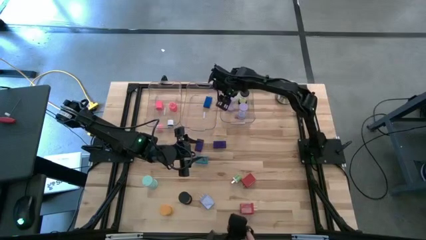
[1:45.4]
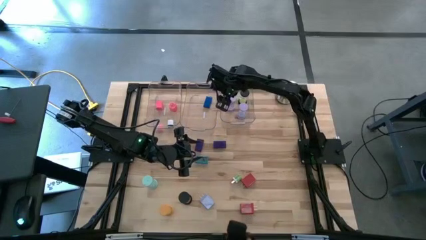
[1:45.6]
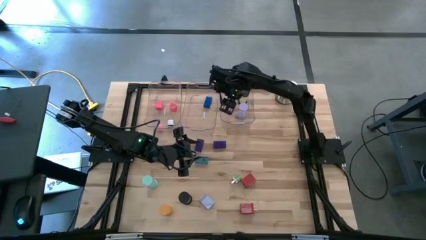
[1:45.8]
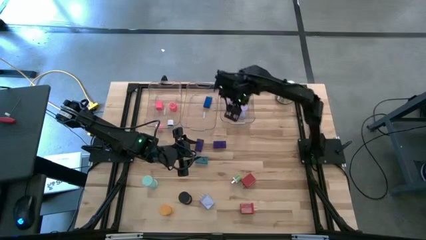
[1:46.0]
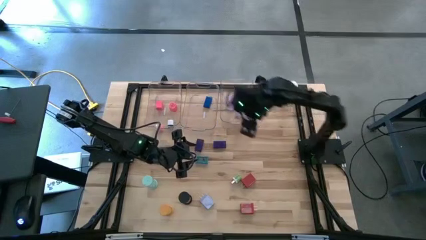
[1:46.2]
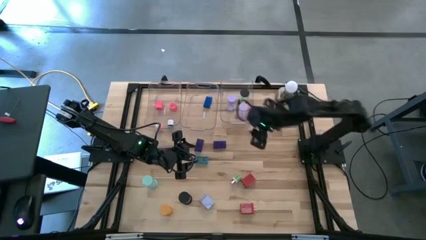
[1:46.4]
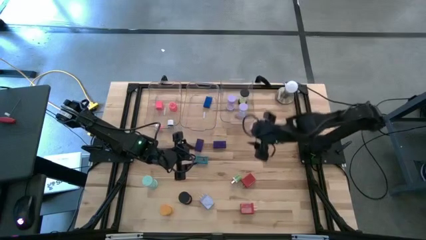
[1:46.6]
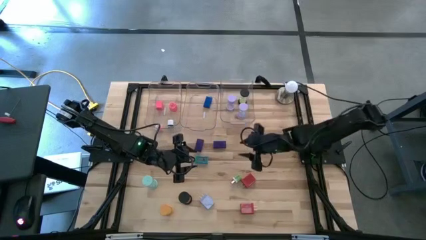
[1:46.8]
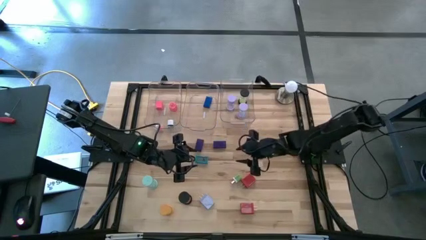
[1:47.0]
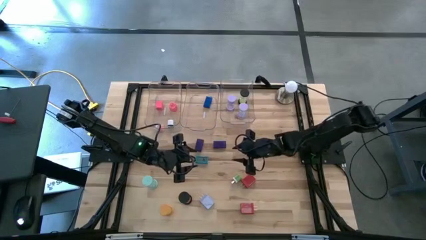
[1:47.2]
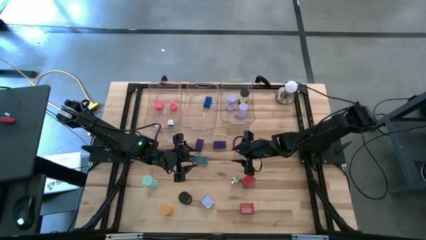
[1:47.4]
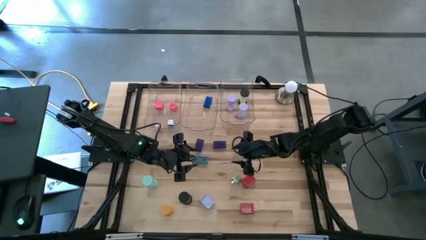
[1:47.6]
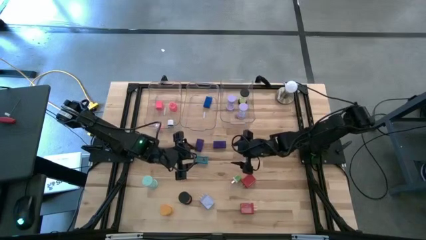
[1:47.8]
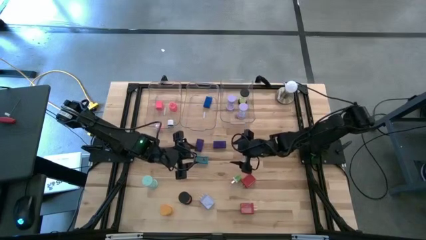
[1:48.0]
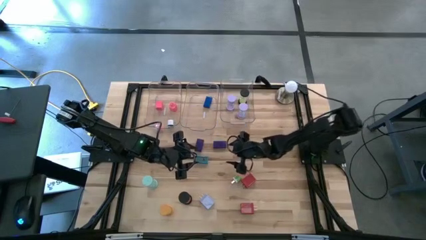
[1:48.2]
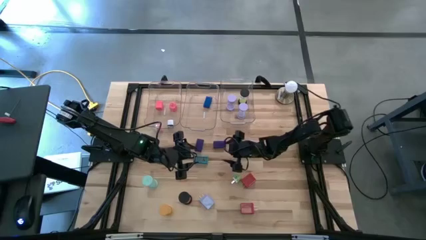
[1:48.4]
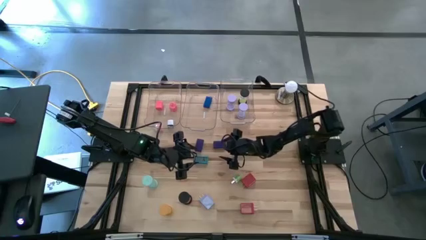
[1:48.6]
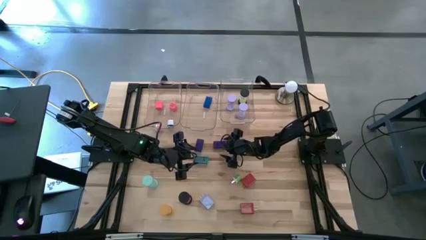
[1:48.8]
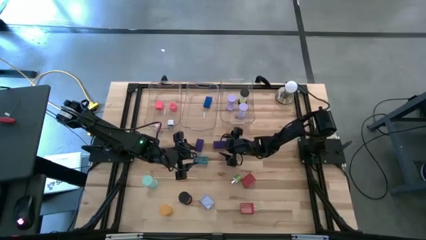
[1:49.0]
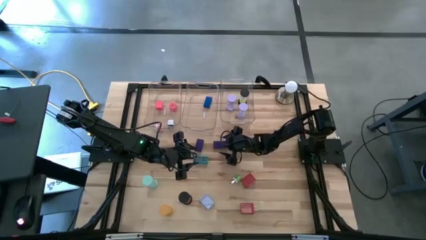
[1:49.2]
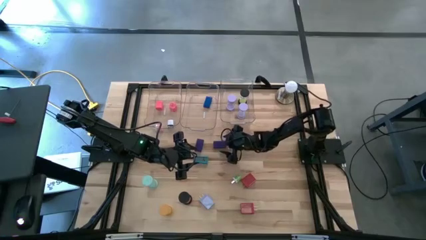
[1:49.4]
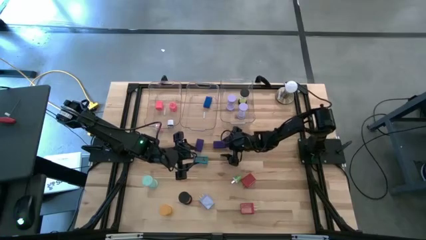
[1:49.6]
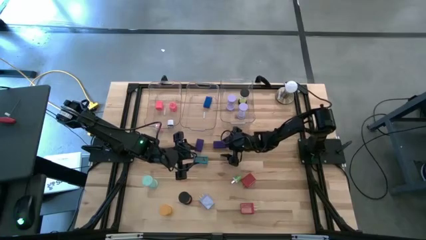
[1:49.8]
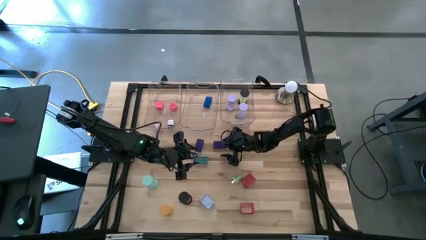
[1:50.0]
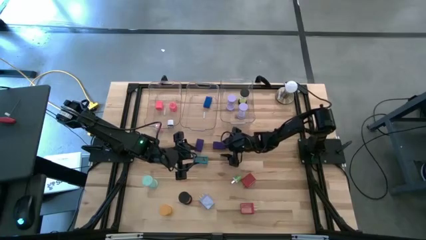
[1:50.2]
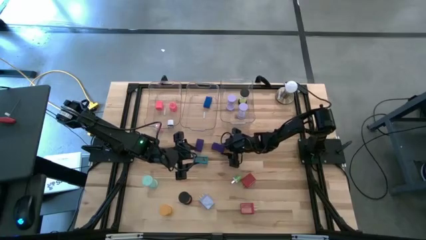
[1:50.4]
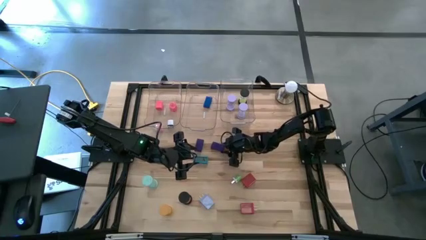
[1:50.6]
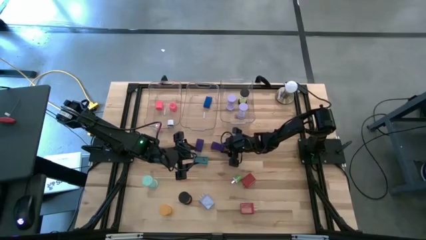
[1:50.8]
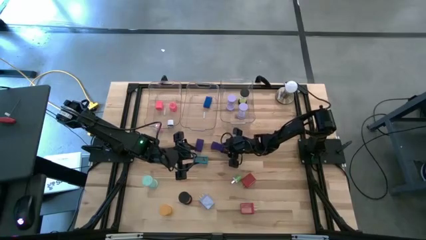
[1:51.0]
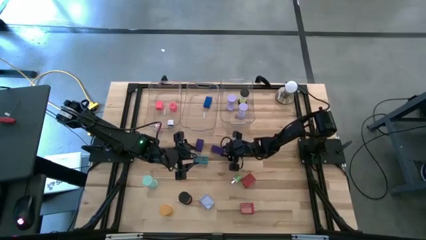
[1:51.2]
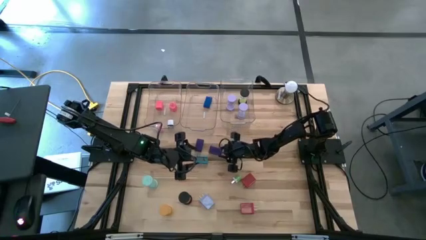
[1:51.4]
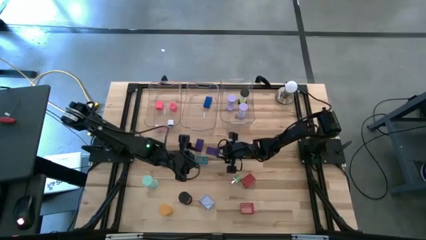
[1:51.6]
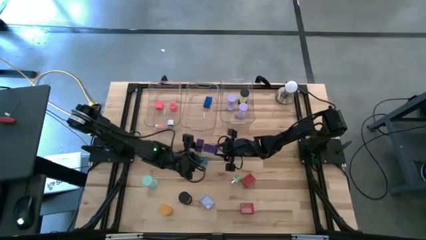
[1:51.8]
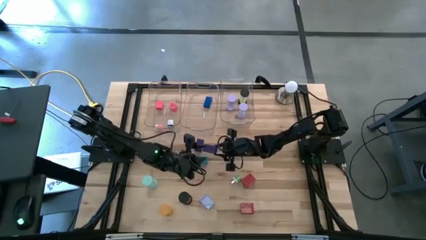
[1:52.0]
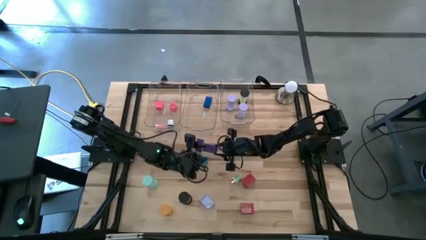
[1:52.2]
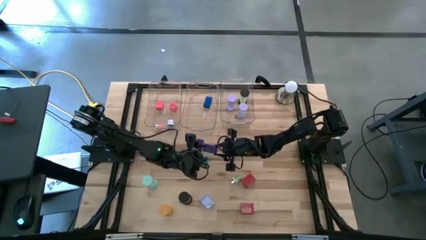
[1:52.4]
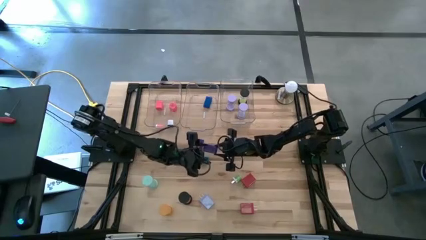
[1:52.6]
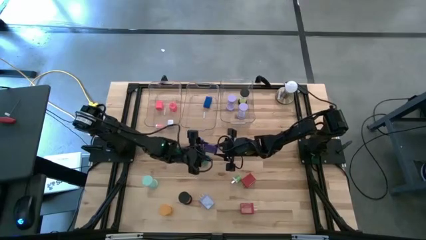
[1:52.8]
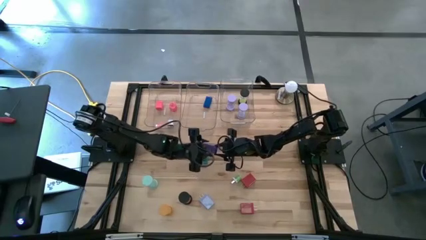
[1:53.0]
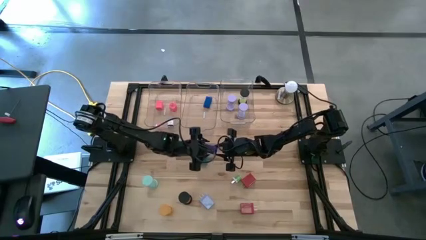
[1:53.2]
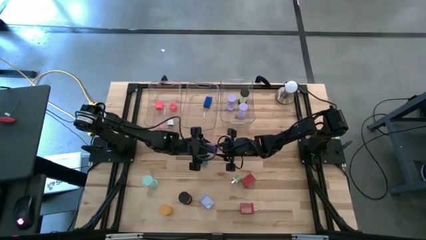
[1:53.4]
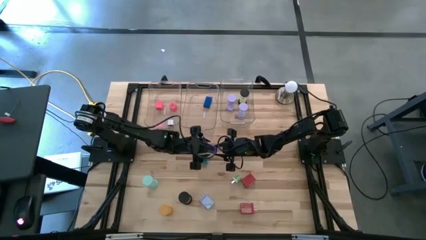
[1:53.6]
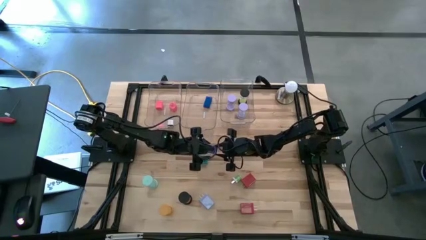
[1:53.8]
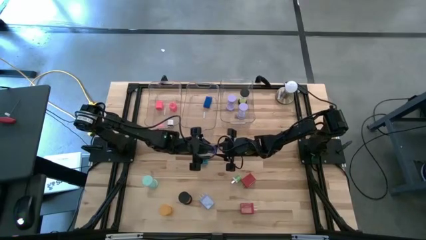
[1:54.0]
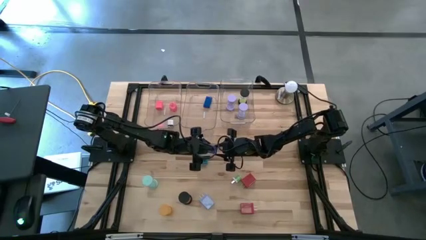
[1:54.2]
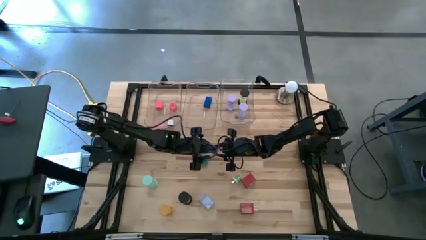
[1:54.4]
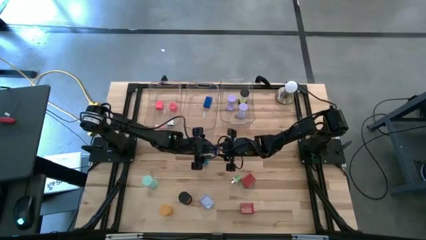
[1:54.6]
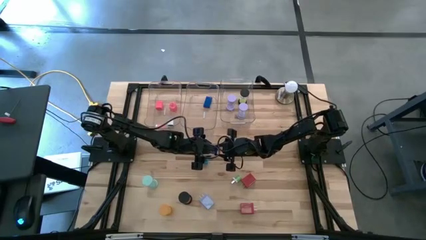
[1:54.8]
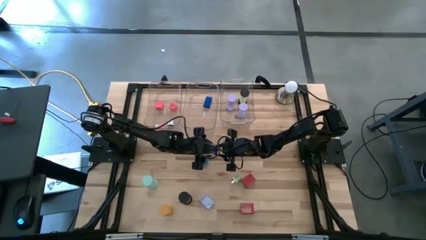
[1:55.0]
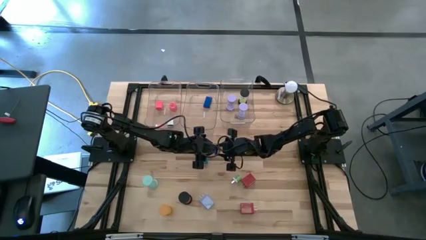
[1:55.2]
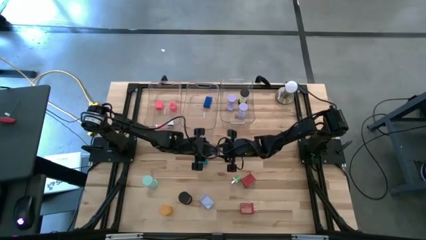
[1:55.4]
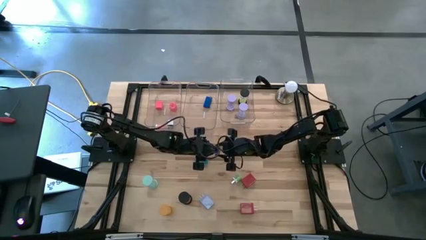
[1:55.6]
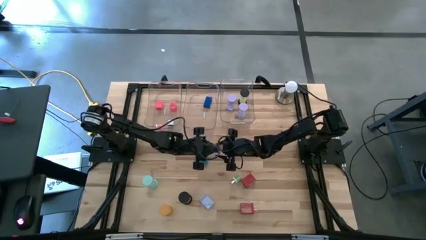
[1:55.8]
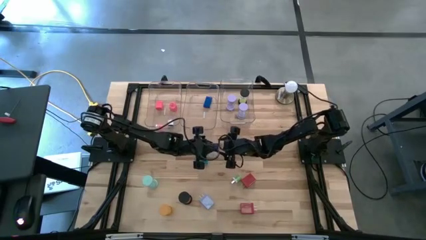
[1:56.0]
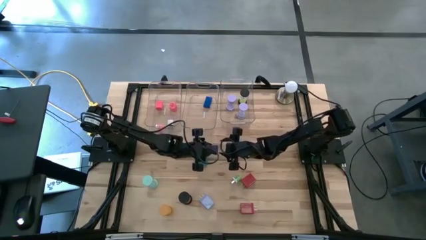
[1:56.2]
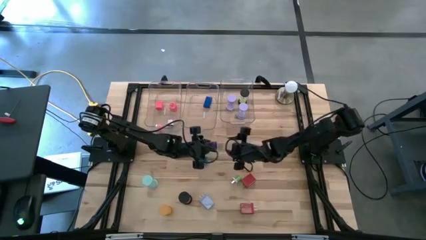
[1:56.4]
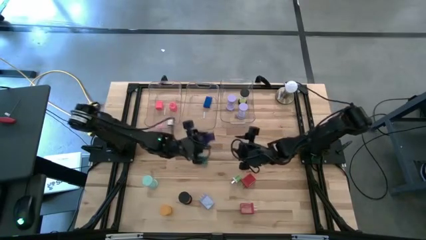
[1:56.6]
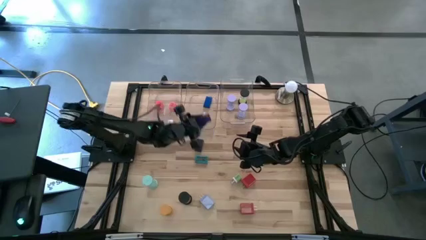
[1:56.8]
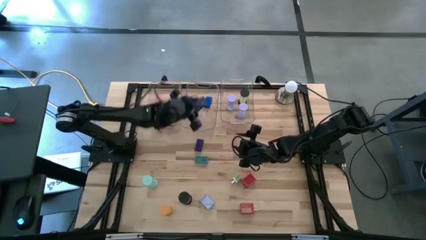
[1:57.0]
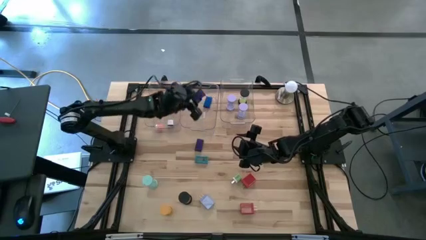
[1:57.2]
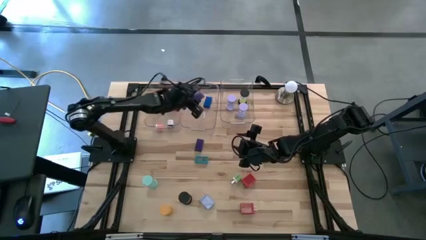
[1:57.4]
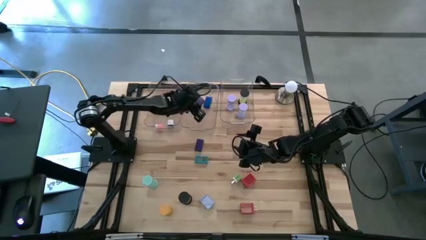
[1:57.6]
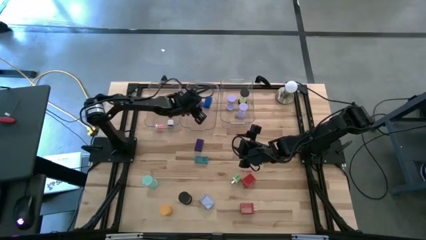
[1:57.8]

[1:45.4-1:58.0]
Task: Pick & Place Office items
Put the right purple digital clock into the middle transparent bin

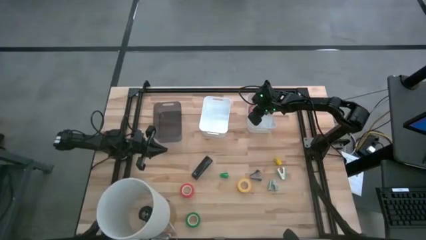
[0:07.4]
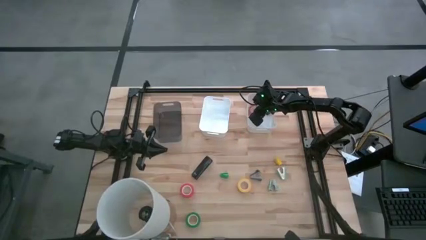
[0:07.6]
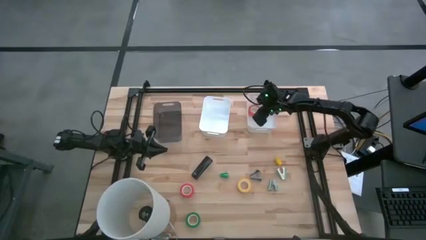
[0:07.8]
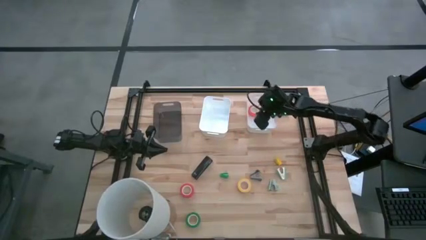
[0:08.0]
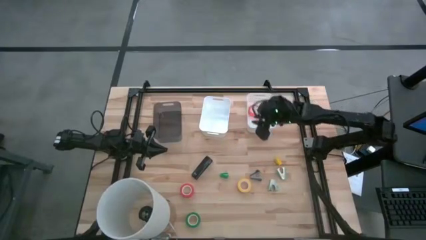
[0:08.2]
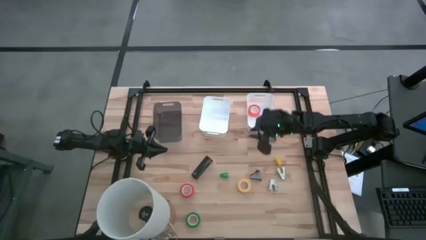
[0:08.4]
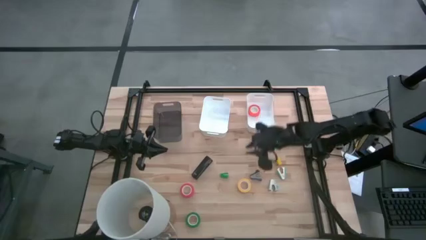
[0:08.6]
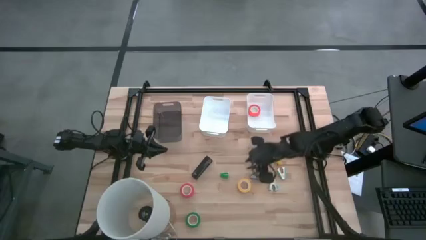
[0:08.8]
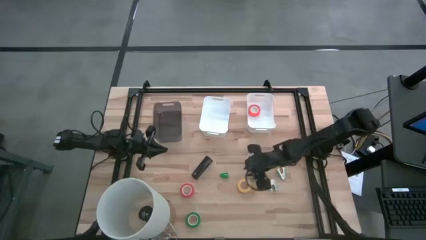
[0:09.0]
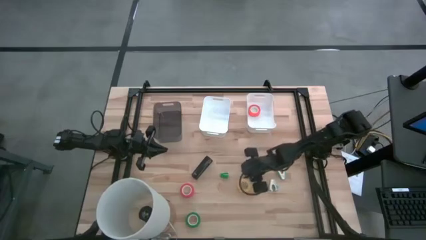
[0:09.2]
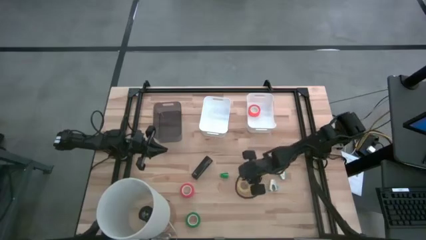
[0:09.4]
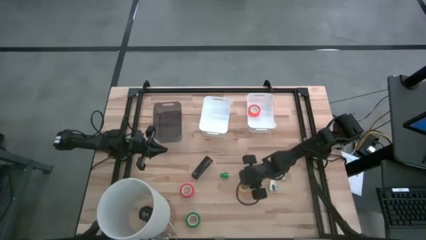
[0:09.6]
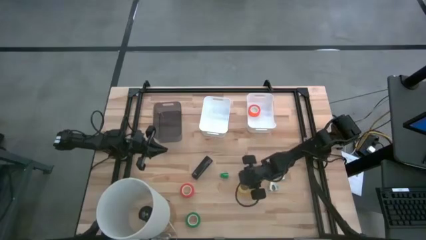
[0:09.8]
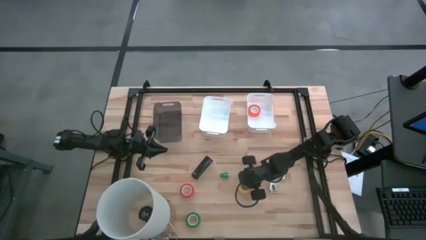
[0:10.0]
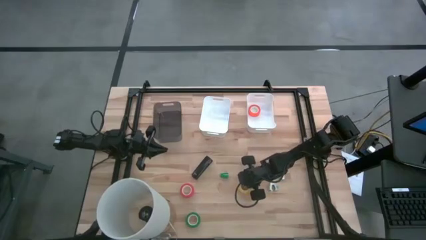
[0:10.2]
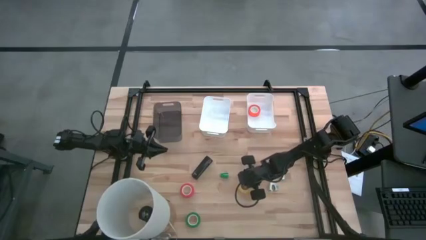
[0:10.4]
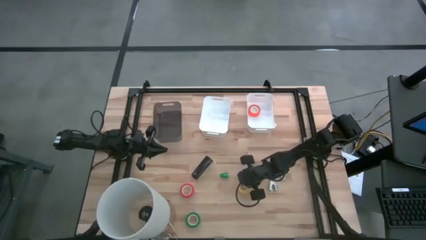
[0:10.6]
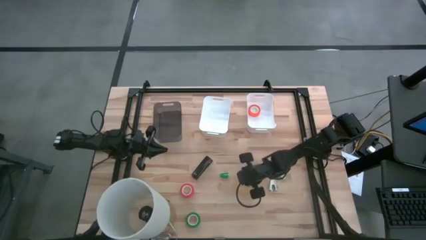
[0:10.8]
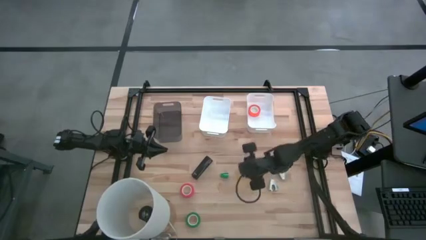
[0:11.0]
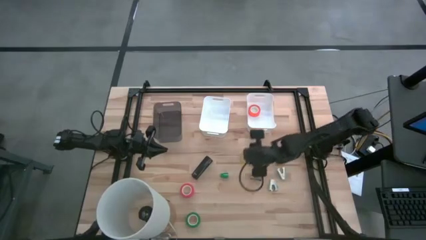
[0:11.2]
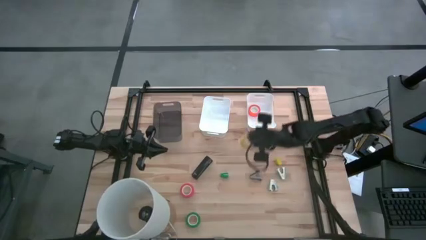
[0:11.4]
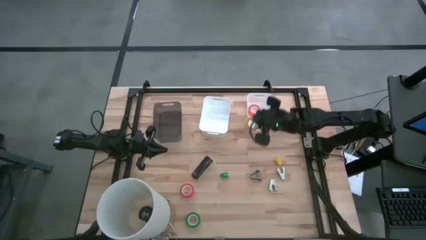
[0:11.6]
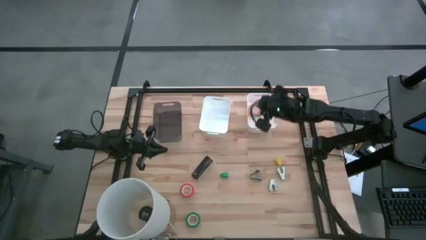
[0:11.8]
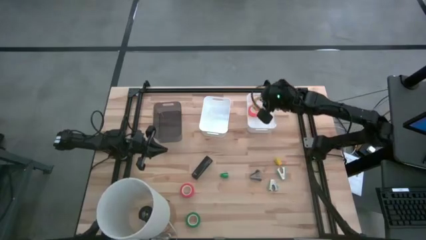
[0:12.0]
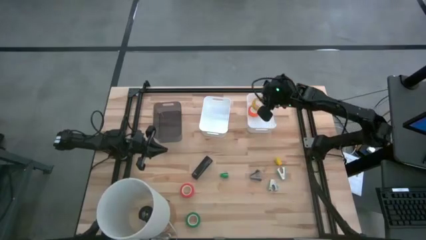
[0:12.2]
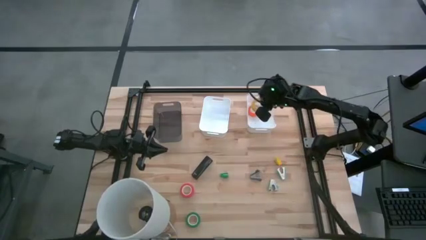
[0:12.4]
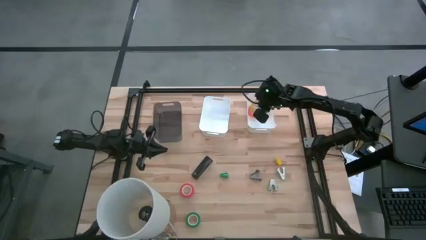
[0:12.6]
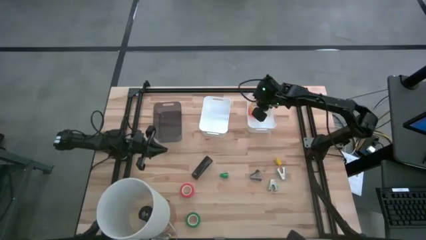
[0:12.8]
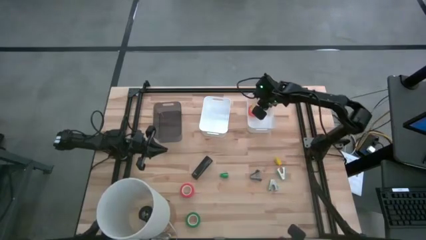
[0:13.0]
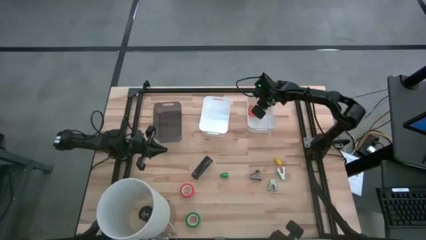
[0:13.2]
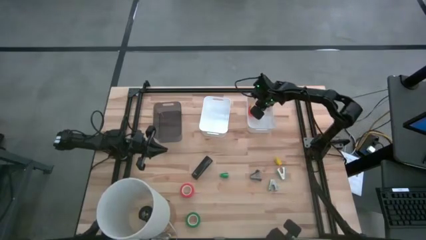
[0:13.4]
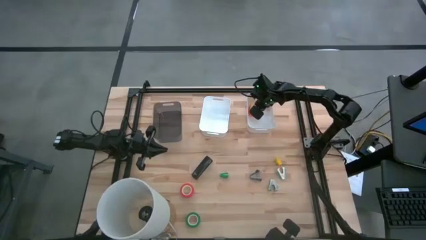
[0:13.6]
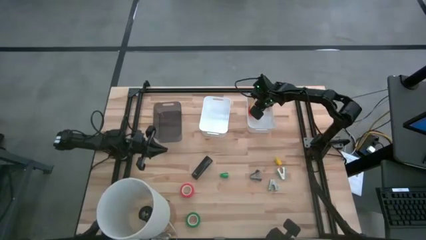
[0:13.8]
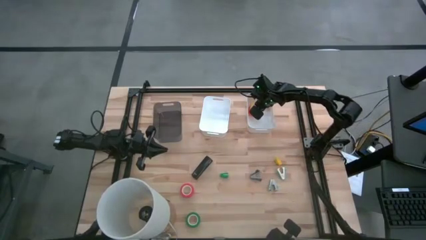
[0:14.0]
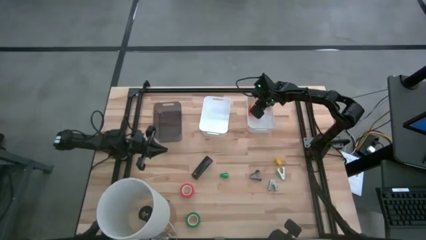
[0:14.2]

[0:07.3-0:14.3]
Task: Pick and place Stapler, Stapler remover, tape
Put the yellow tape into the right white bin
